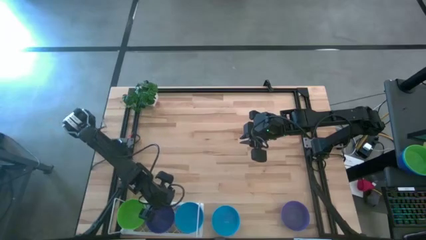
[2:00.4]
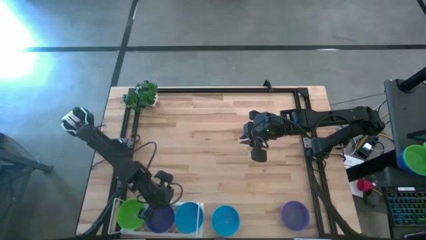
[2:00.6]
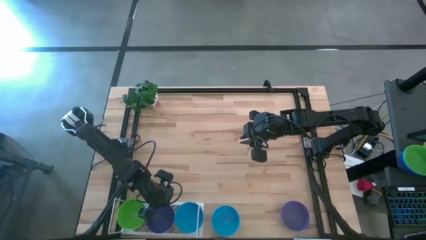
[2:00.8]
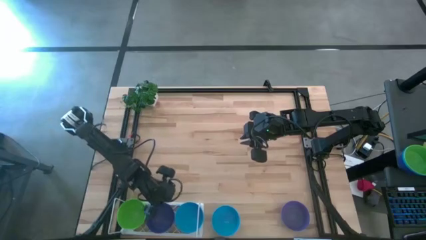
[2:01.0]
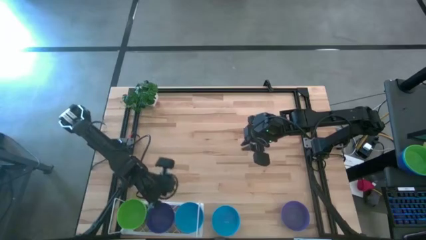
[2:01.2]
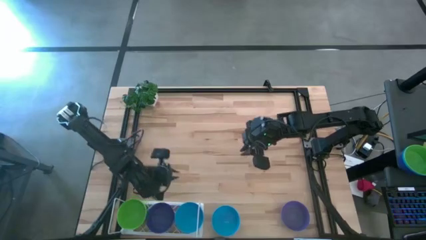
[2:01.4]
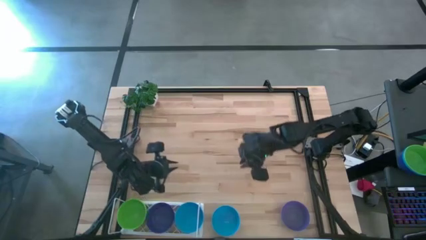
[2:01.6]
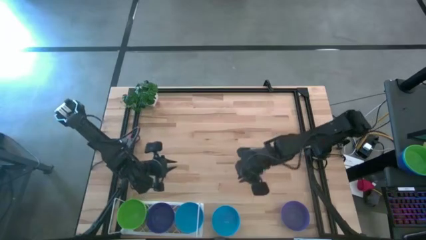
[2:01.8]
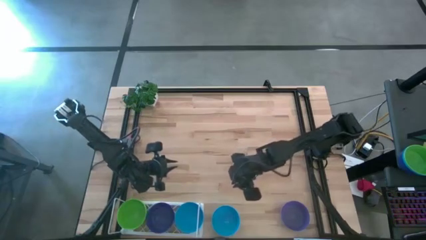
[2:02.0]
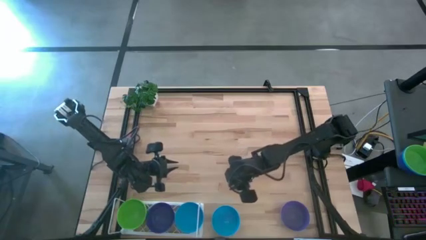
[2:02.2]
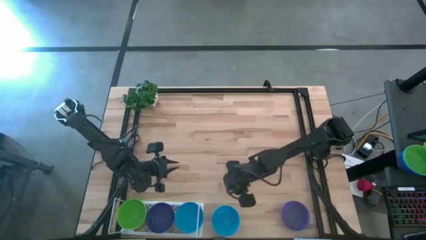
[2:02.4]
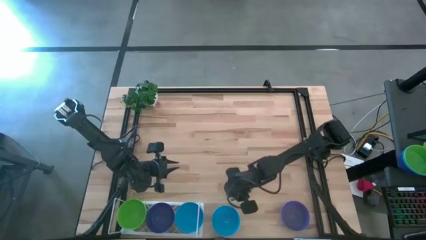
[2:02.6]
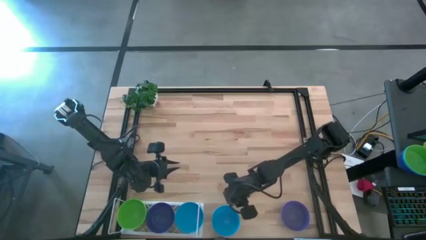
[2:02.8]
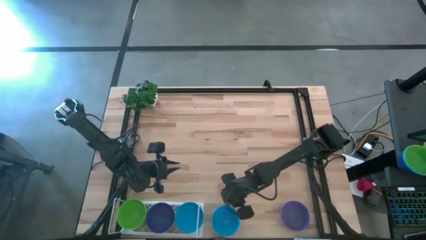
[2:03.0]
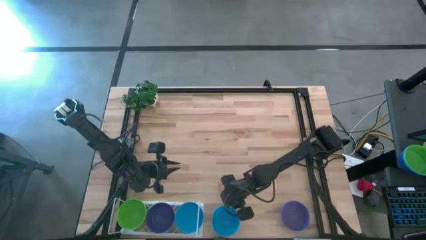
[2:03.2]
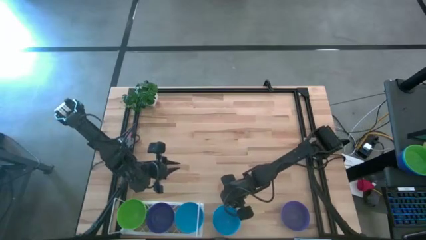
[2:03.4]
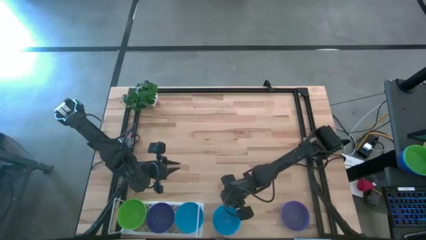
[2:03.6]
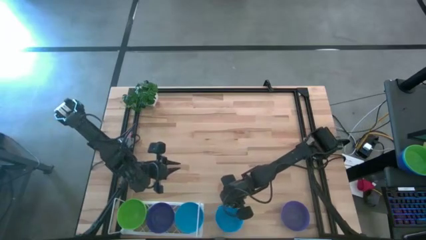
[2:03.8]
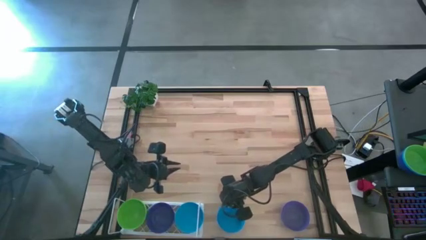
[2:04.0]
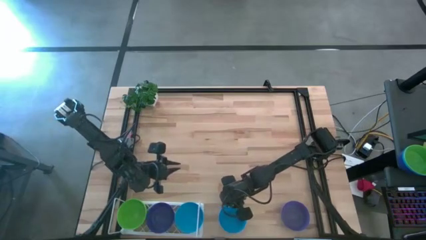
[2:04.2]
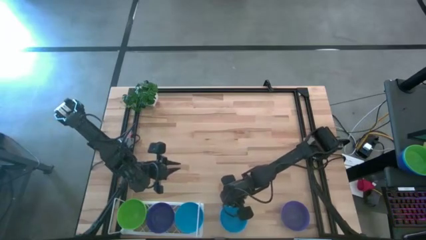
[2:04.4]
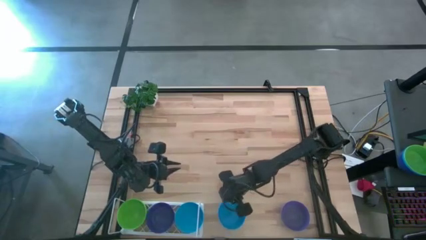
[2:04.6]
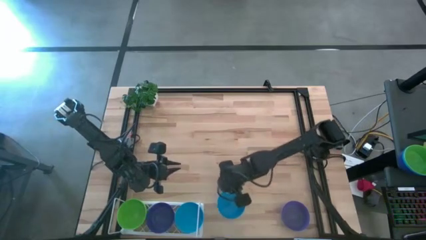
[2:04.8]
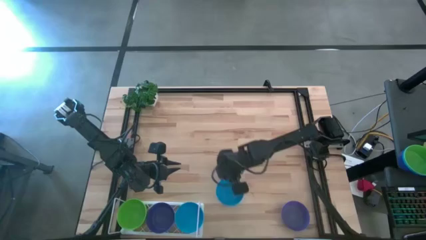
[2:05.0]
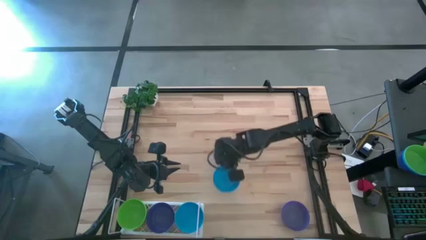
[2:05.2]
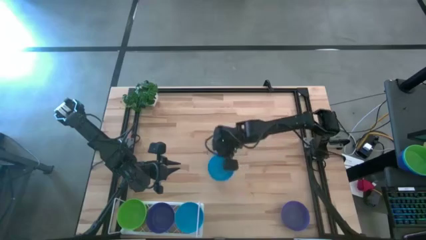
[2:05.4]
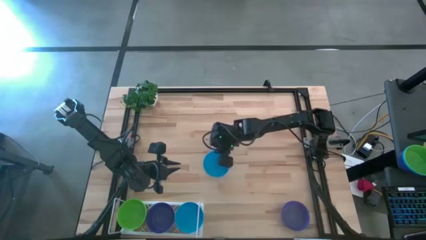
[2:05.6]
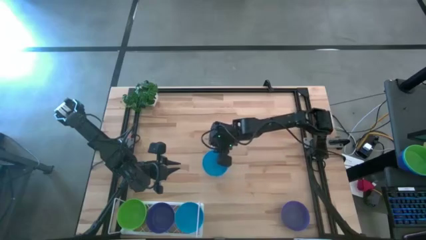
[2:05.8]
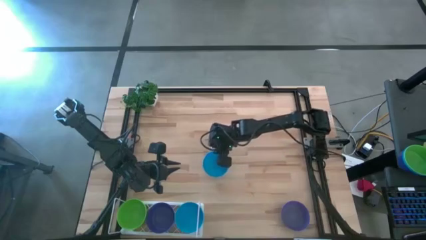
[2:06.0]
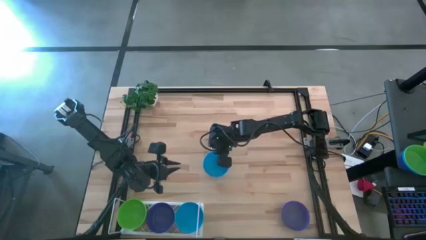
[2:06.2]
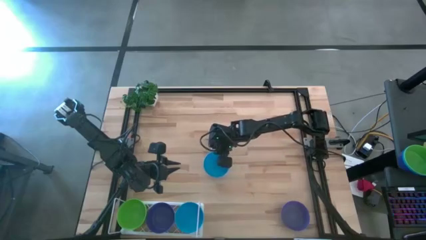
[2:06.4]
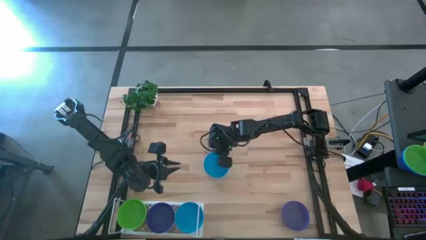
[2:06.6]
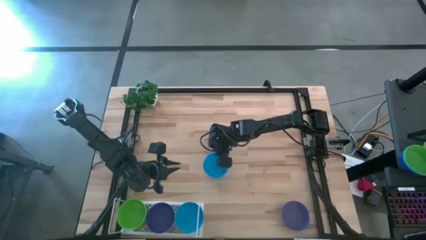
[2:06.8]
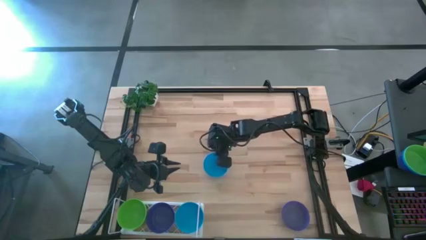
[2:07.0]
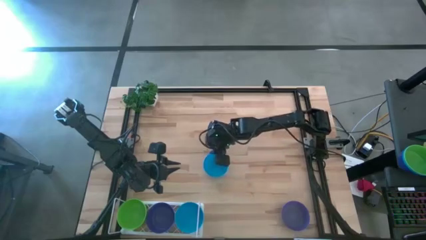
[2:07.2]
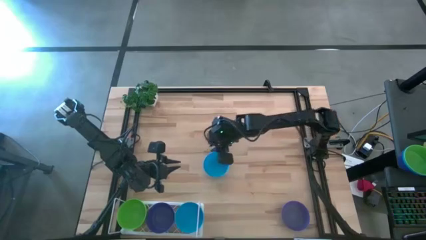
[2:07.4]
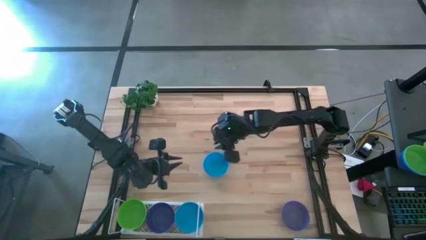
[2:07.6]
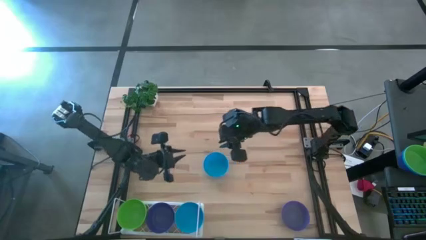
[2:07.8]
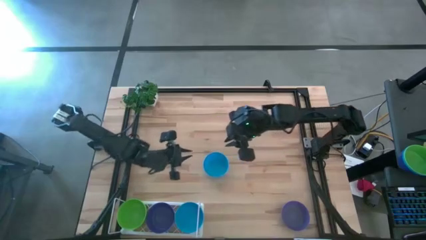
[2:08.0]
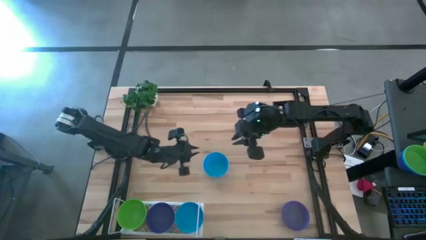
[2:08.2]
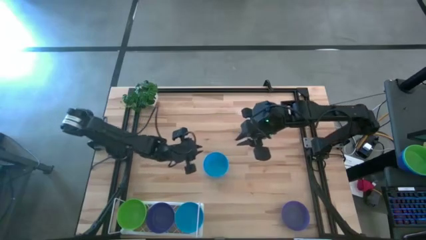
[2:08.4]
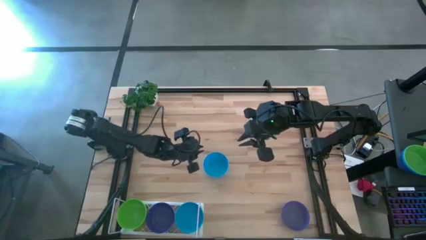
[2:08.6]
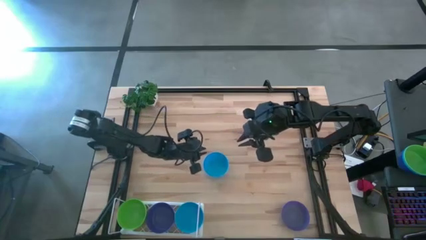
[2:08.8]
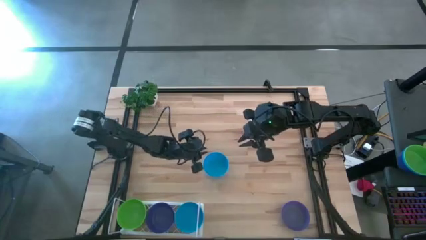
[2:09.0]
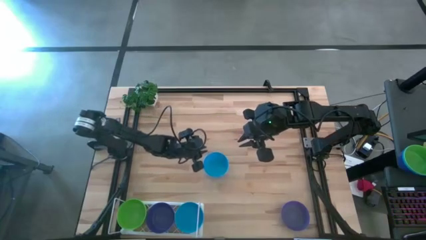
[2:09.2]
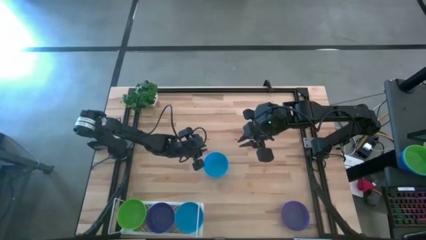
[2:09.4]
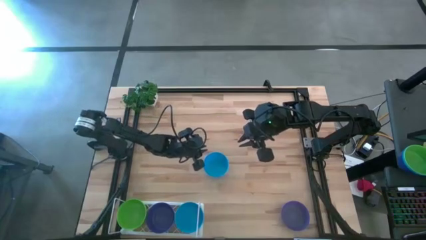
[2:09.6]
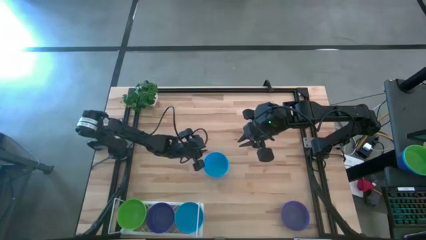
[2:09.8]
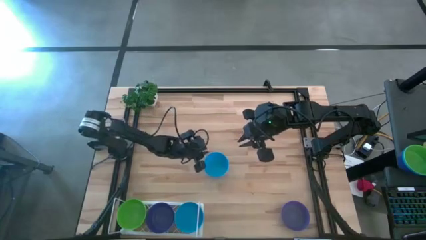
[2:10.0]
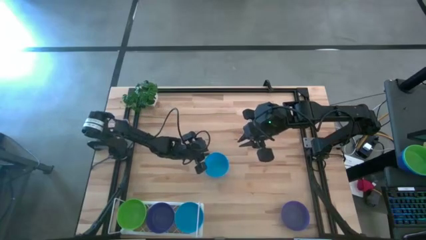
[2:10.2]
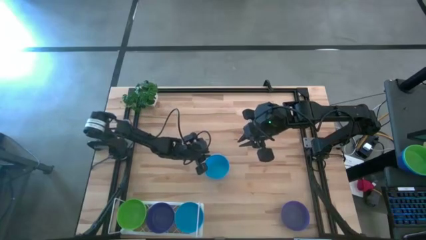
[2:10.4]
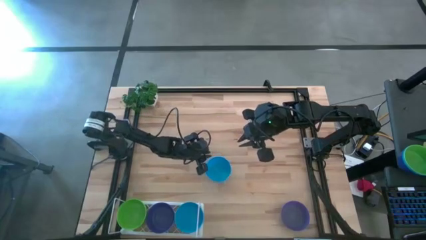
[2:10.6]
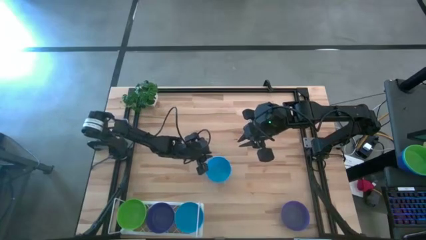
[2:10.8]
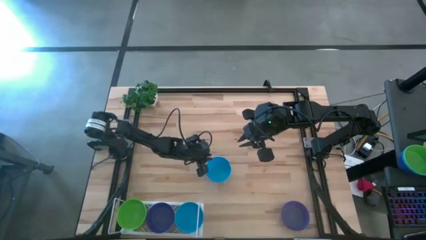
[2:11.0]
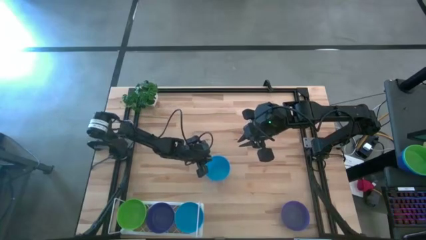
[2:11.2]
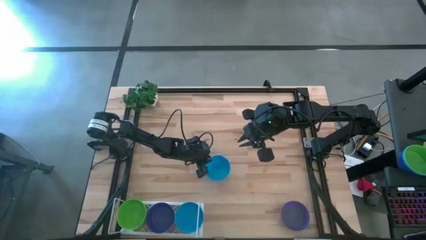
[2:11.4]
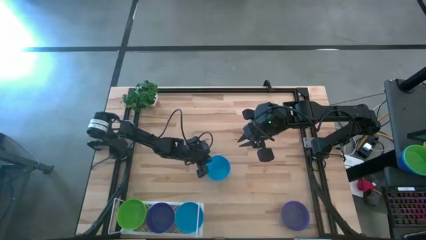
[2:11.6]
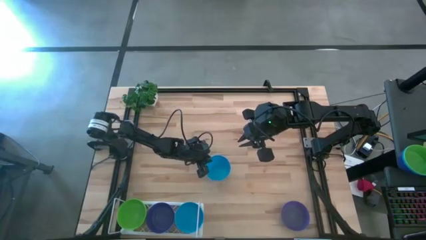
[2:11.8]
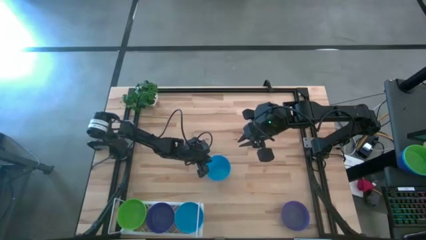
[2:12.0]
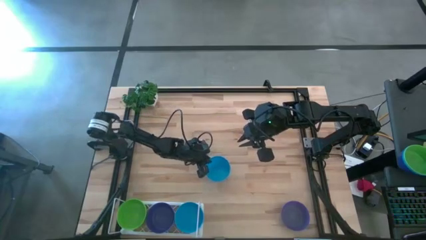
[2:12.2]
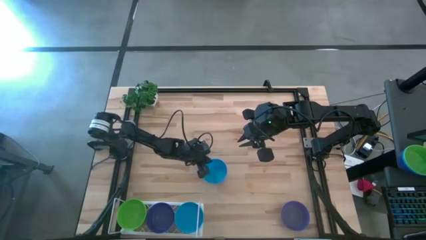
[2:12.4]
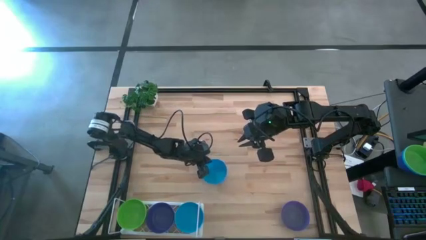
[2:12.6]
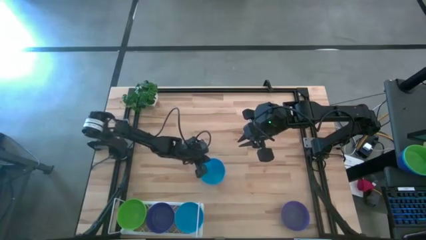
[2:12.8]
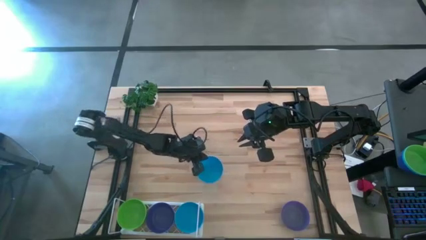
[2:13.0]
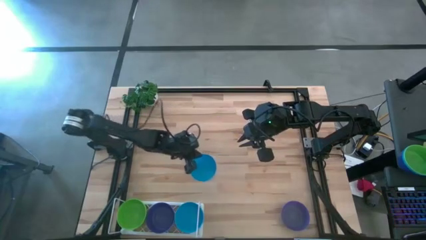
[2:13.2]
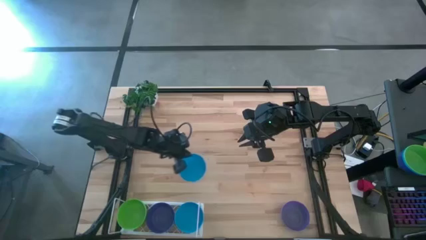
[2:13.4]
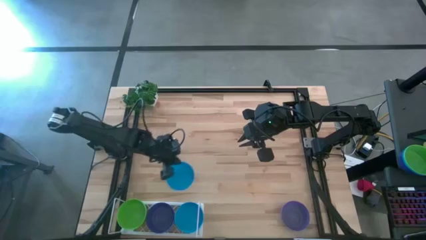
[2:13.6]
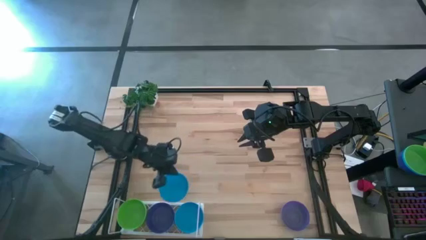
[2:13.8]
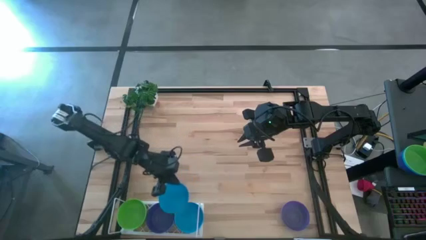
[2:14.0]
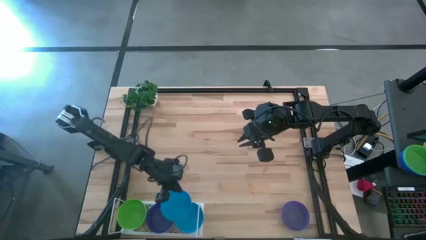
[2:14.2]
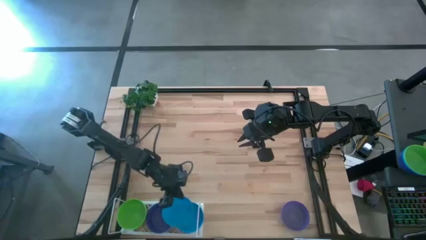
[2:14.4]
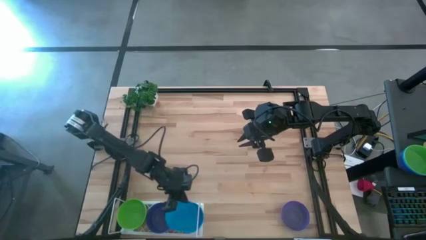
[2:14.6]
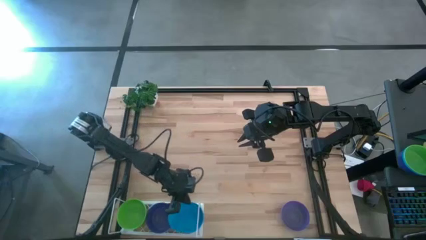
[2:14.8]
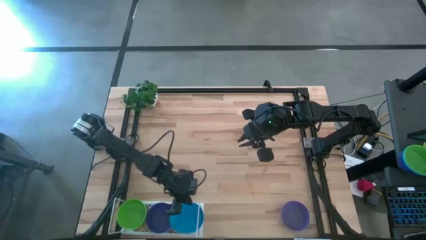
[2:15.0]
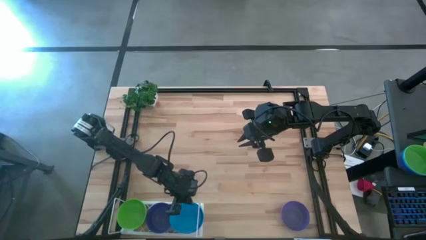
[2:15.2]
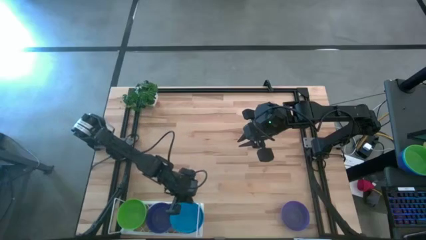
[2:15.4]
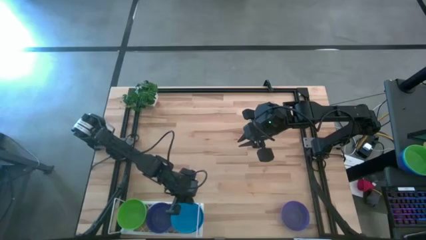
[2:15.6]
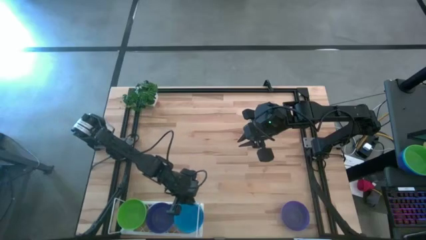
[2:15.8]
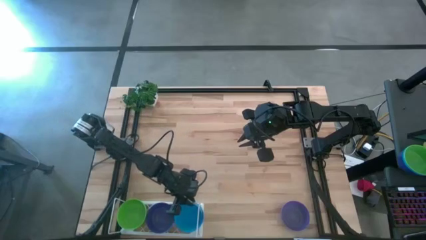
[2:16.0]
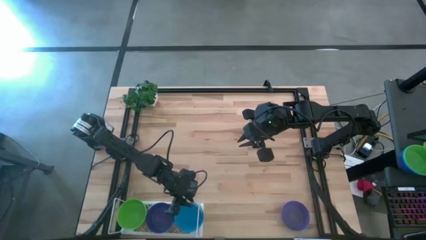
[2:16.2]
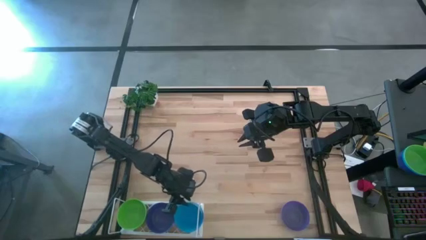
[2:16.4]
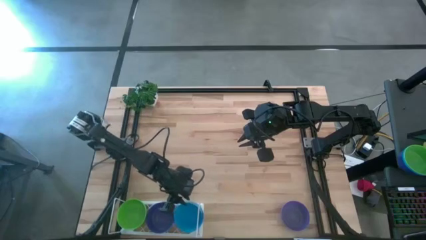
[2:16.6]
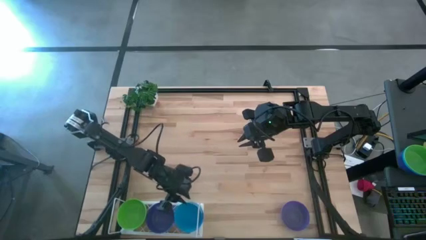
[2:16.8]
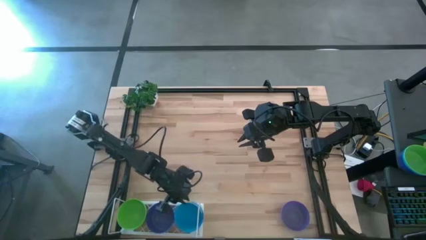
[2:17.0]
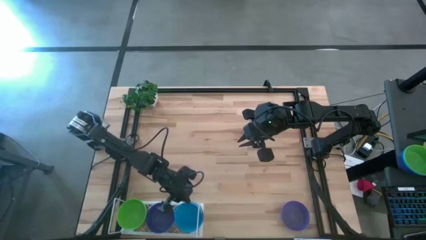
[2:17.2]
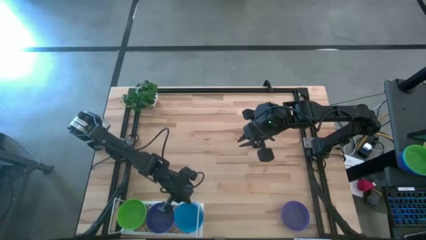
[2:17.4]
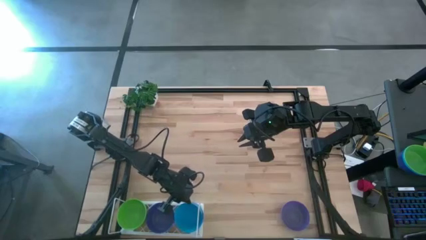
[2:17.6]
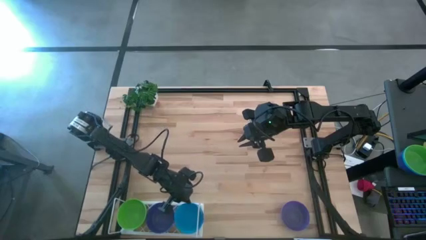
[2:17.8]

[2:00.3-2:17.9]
Task: Pick & Place Mini bowls
Stack the light blue bowl on the light blue bowl on the shelf
